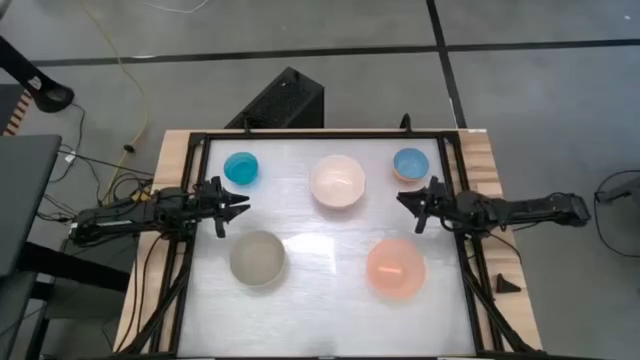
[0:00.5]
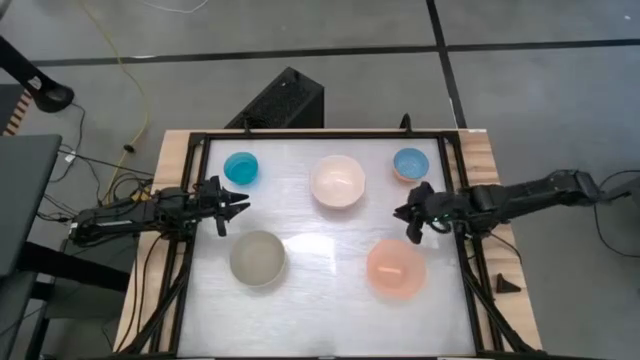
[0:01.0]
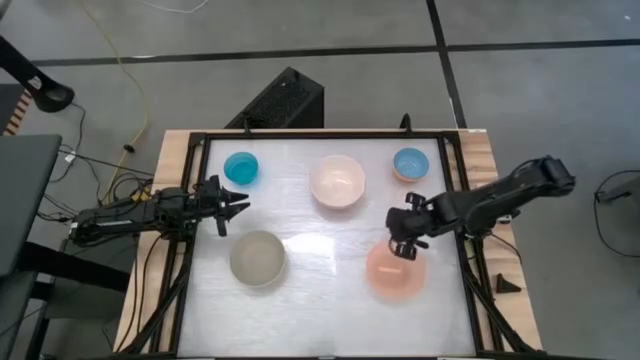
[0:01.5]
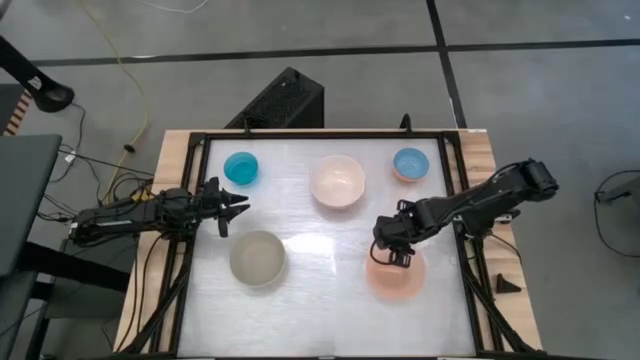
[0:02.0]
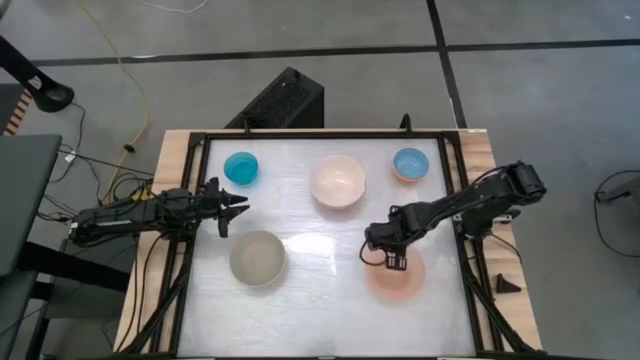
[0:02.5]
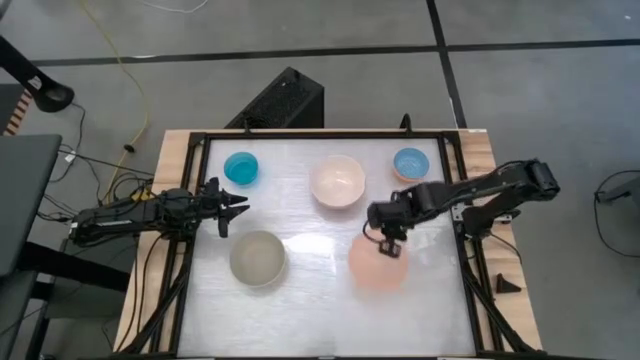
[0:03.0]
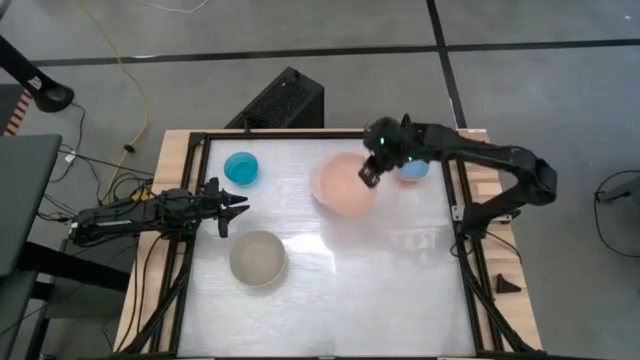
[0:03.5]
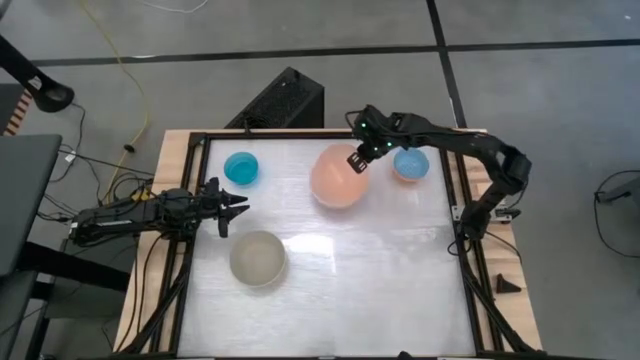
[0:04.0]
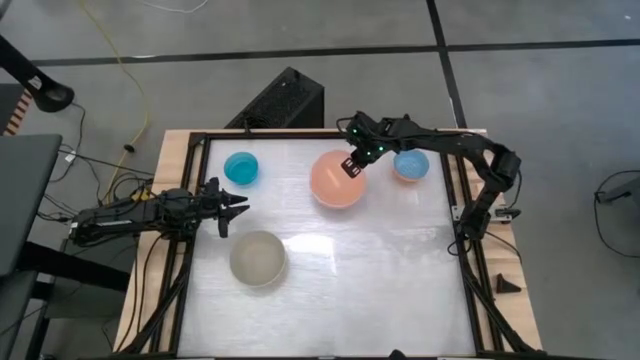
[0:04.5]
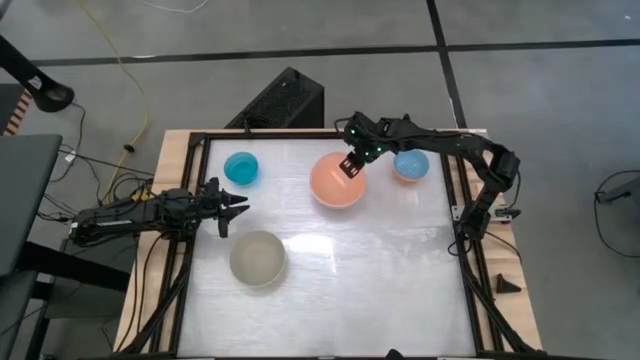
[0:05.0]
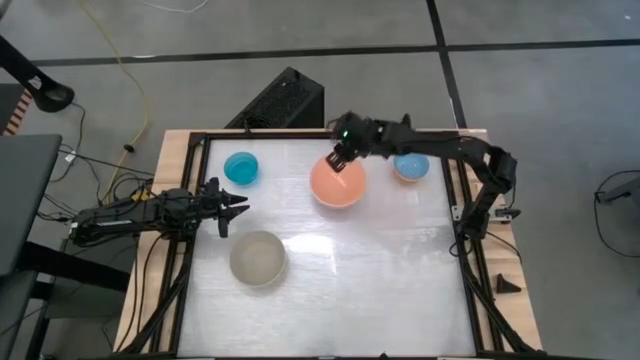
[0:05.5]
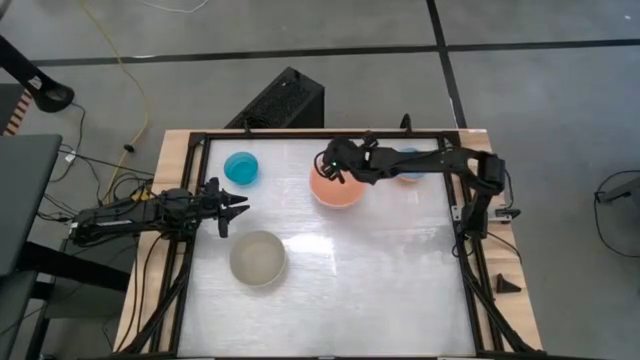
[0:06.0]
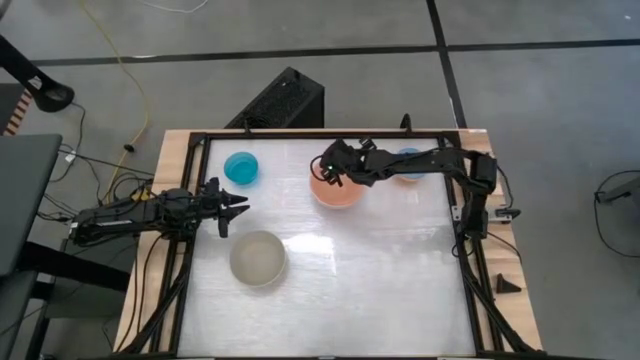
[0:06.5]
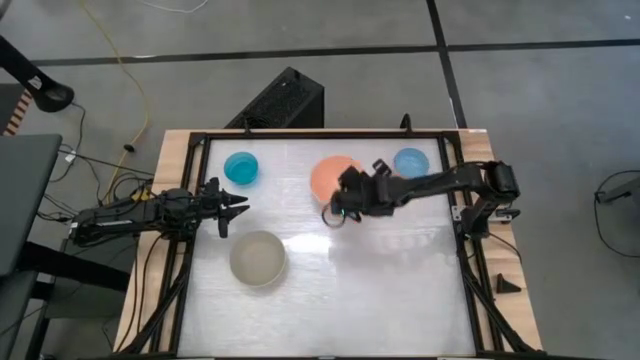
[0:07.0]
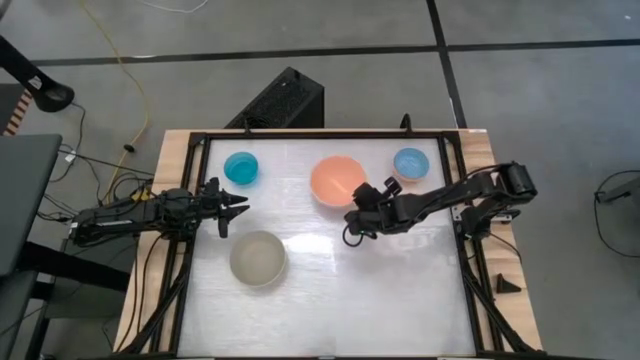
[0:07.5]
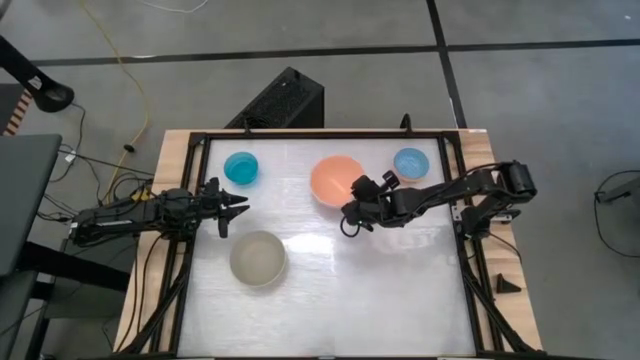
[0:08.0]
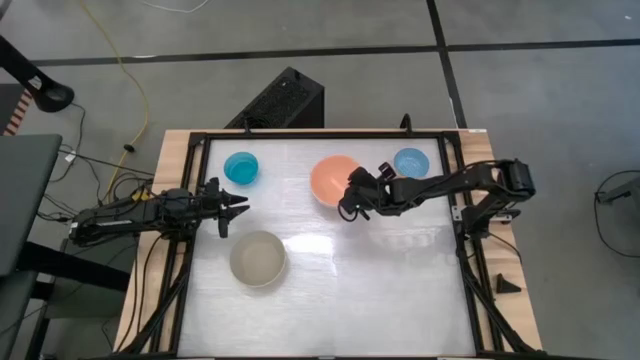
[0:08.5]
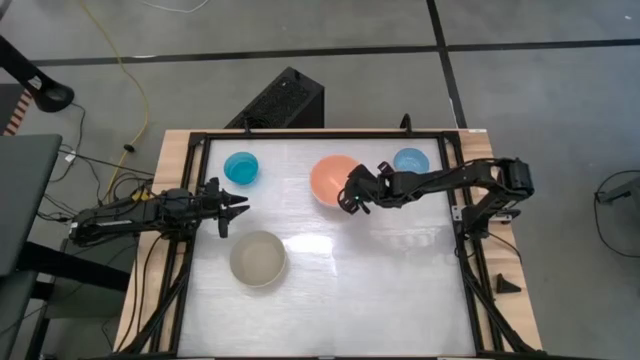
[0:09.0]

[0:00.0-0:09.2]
Stack the orange bowl on top of the white bowl

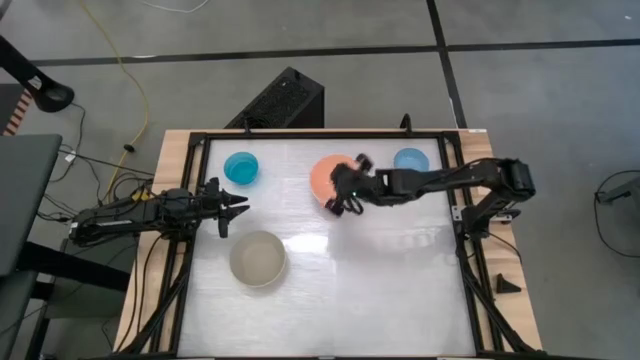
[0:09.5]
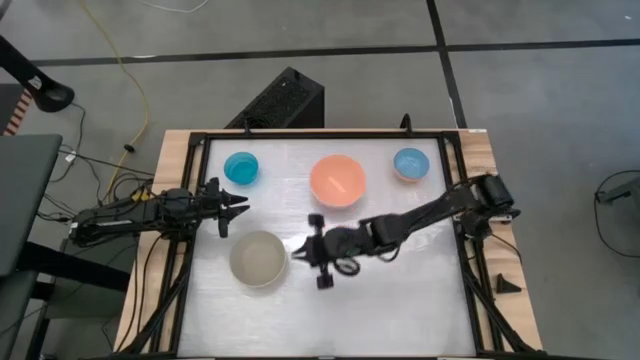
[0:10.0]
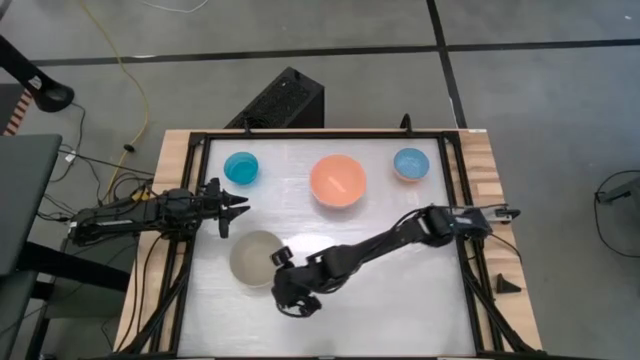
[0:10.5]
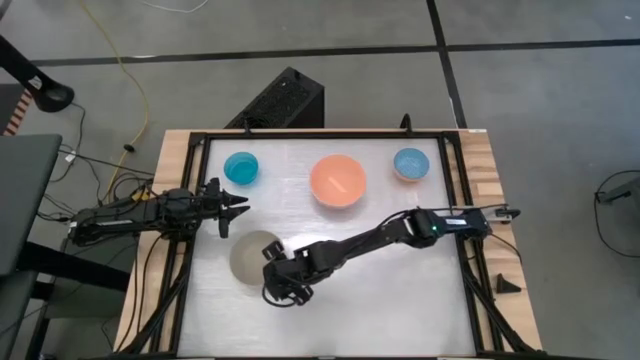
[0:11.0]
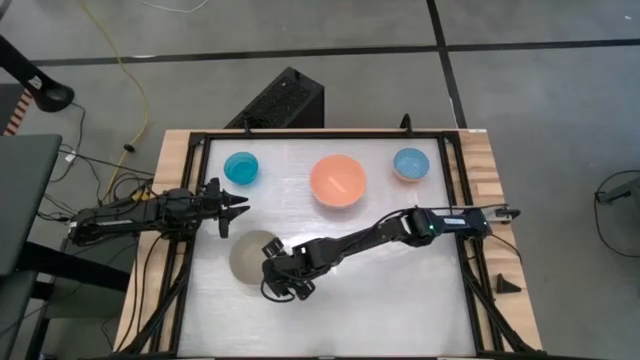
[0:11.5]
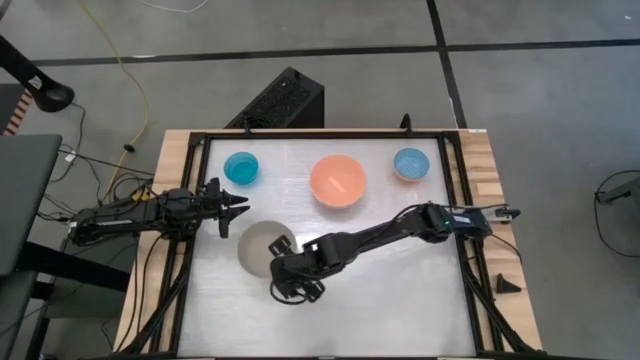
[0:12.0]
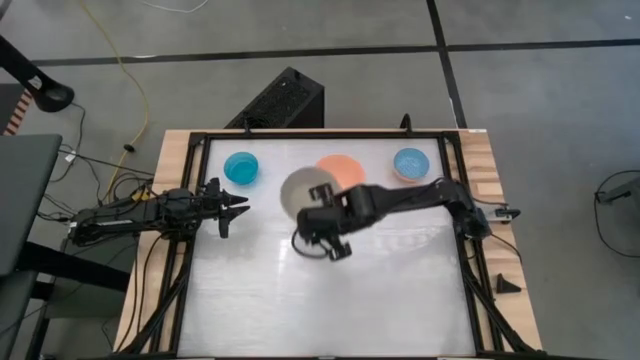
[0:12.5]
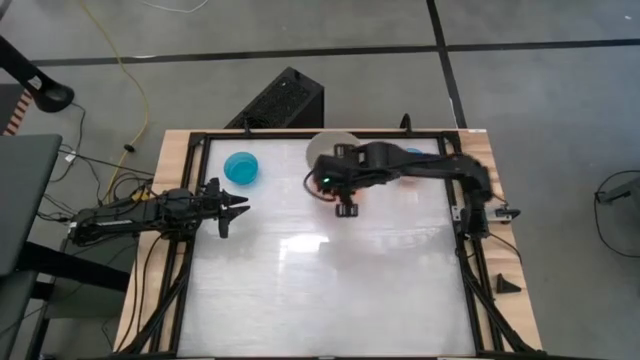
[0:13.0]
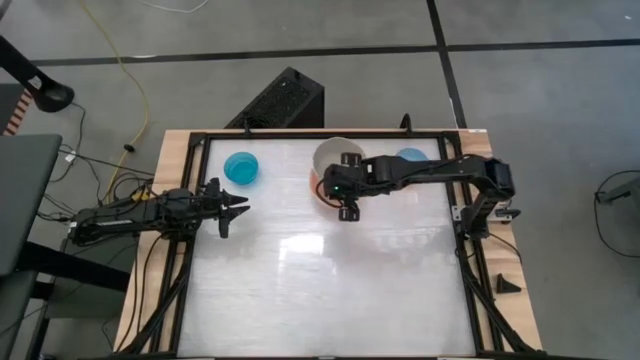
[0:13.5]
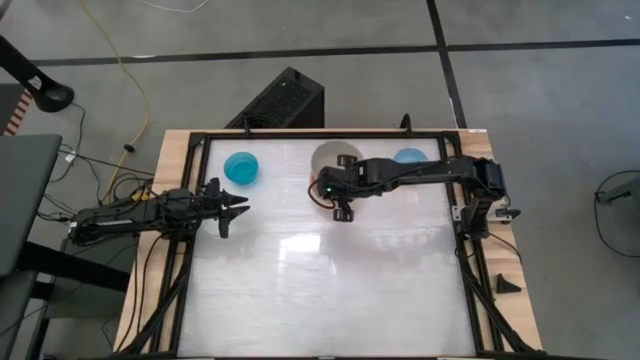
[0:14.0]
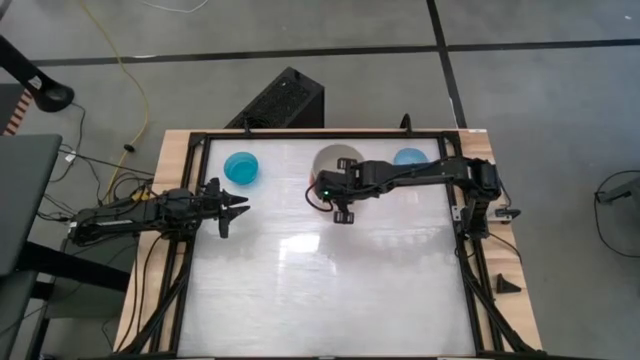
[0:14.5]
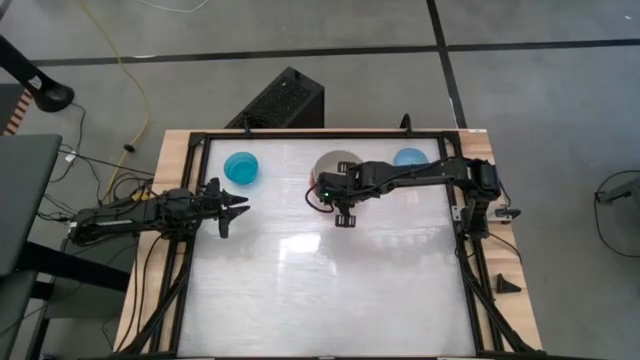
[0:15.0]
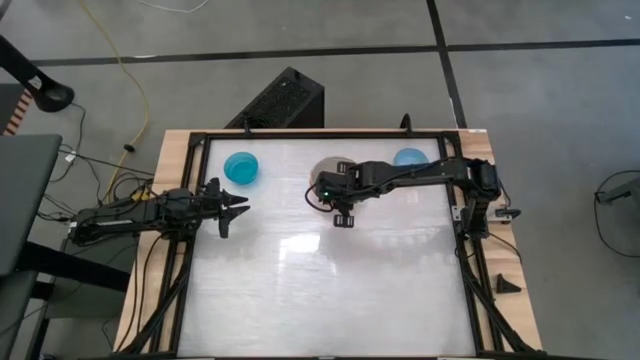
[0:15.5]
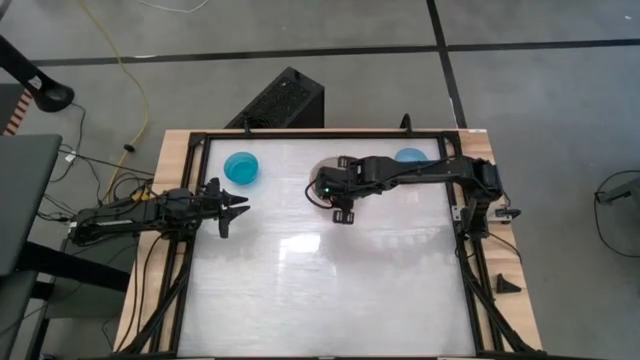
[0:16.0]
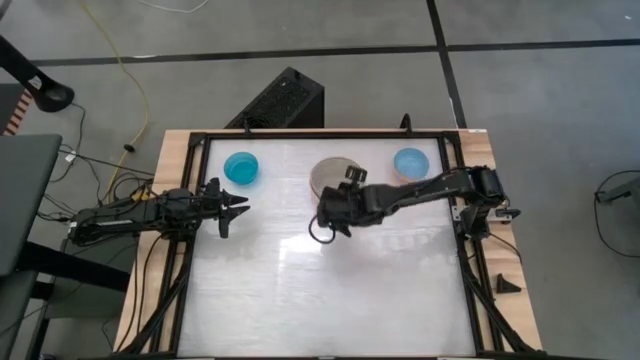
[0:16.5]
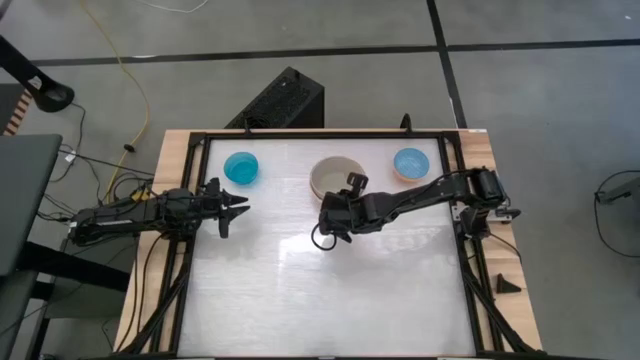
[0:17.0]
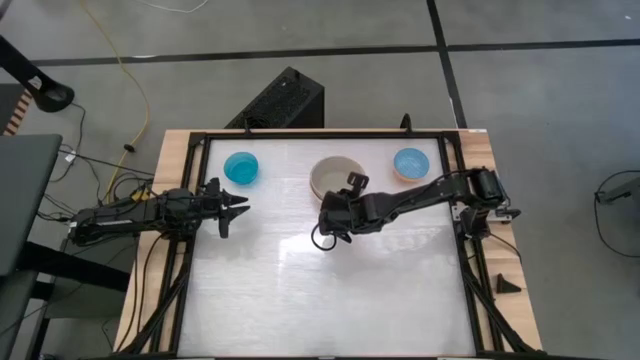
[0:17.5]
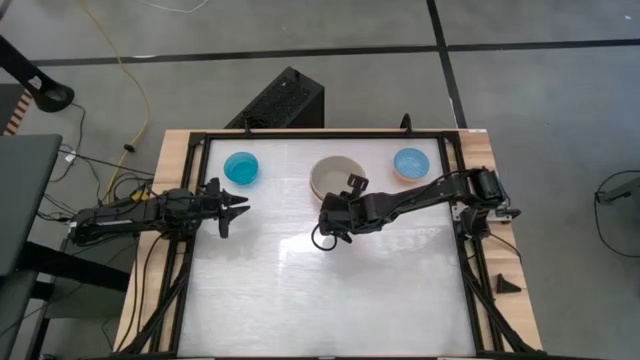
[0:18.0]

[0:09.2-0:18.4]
Stack the gray bowl on top of the orange bowl

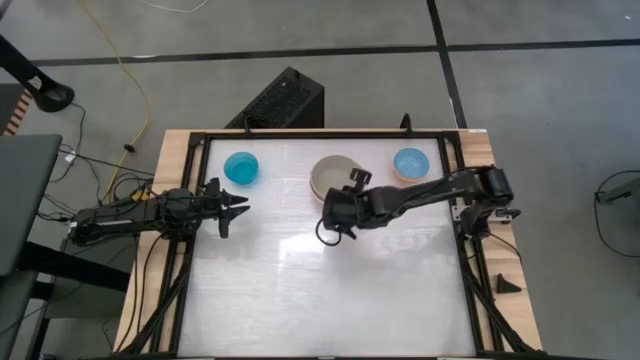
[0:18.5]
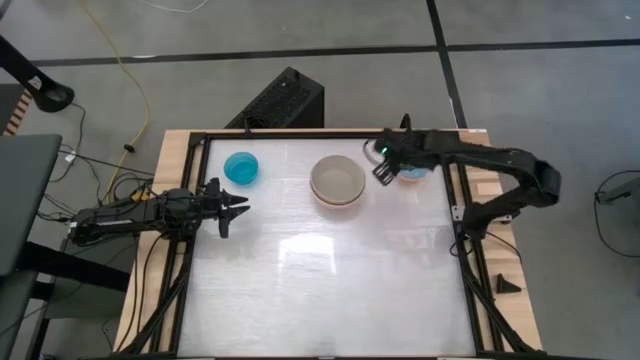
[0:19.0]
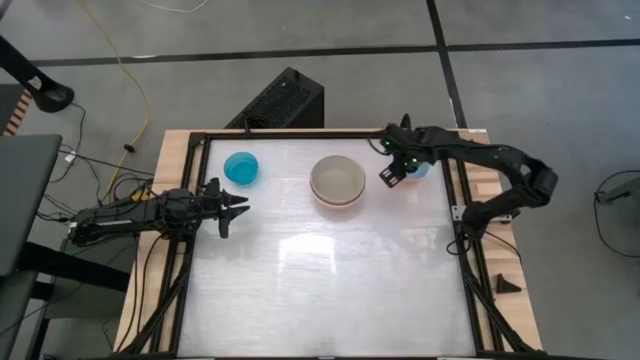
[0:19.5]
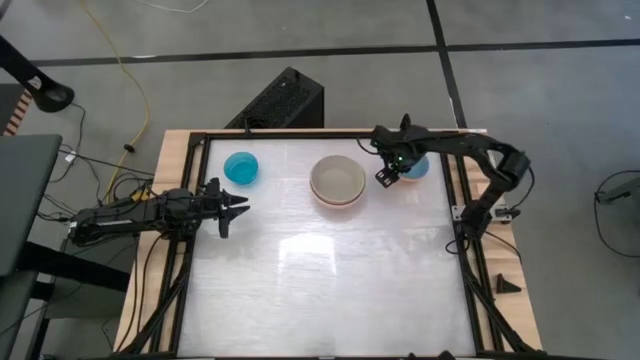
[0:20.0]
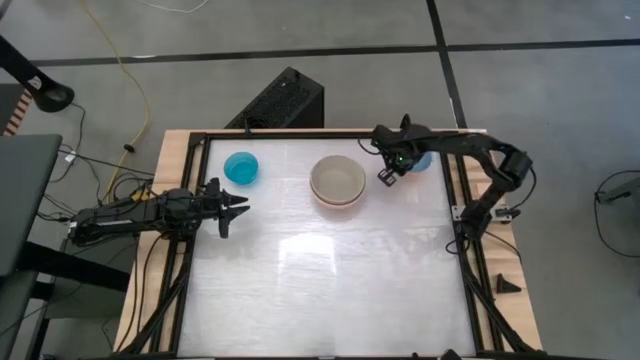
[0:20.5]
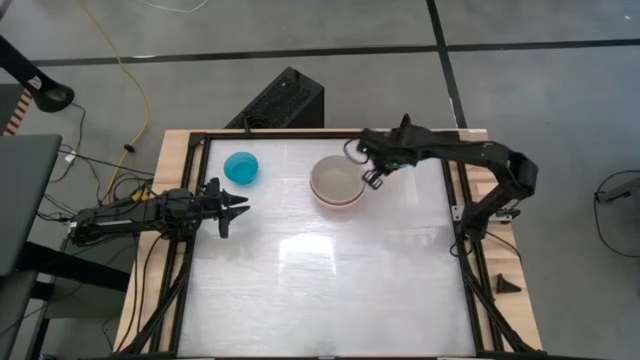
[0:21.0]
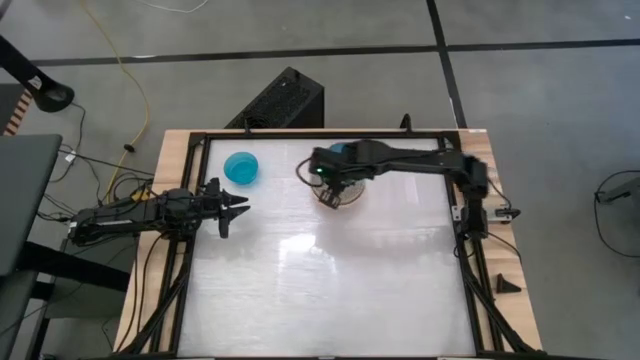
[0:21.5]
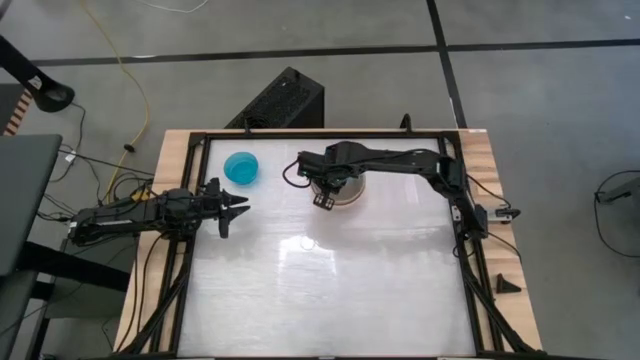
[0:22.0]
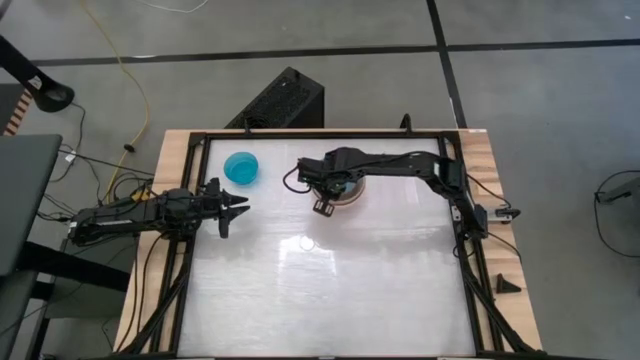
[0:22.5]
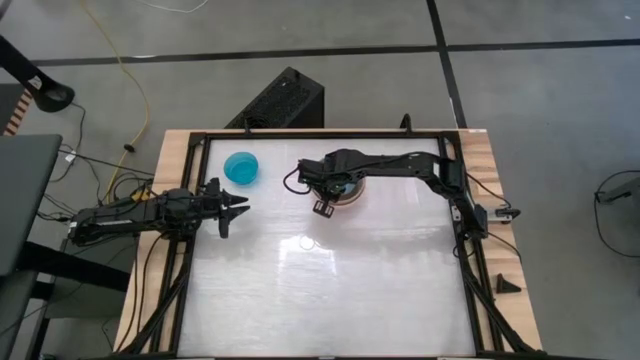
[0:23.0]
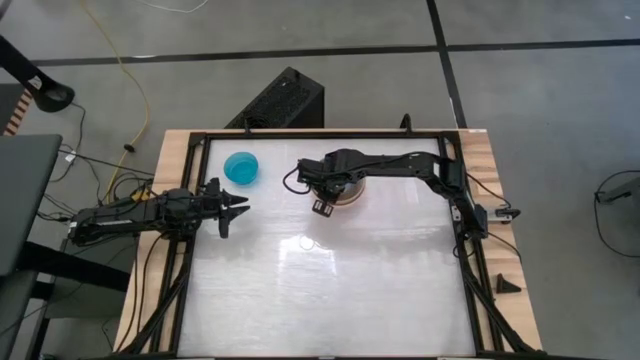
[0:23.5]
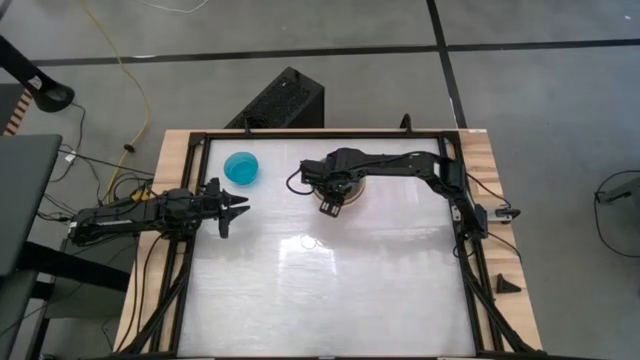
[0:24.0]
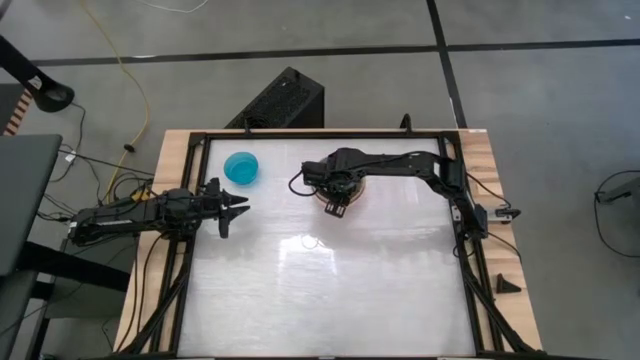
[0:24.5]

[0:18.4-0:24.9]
Stack the blue patterned bowl on top of the gray bowl
